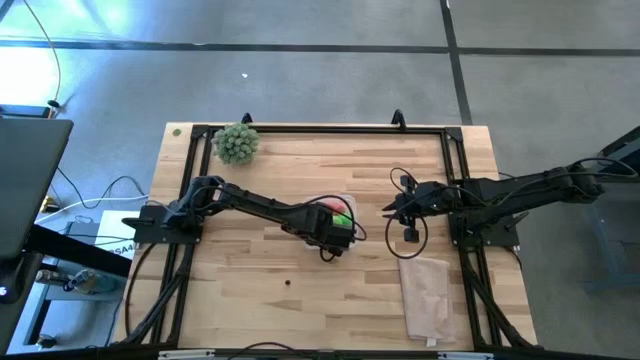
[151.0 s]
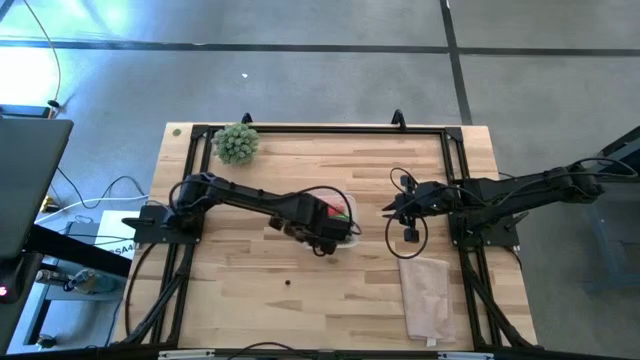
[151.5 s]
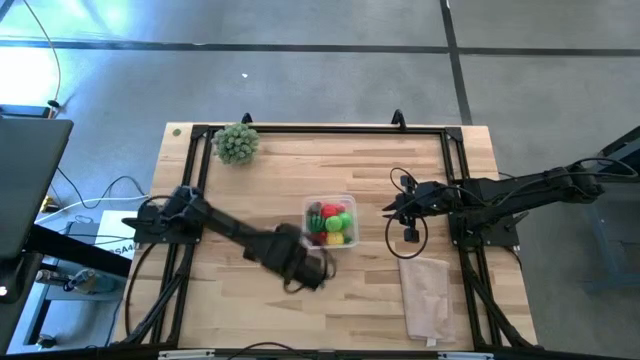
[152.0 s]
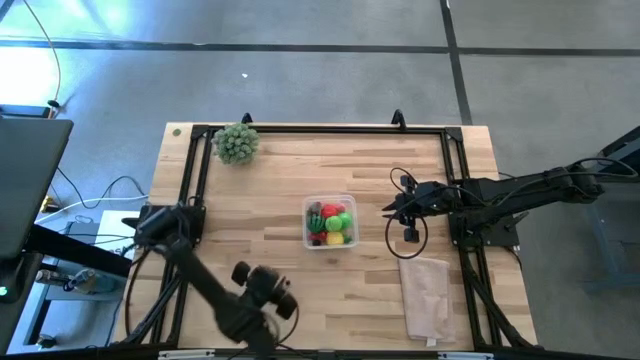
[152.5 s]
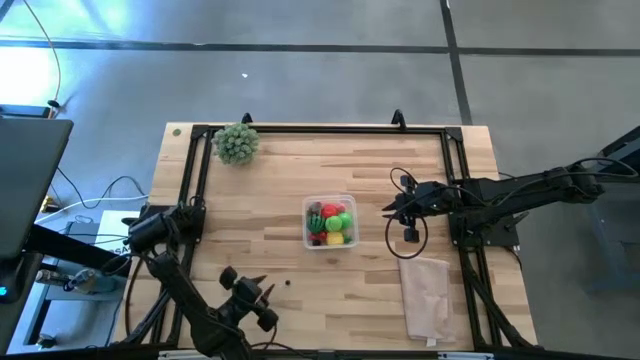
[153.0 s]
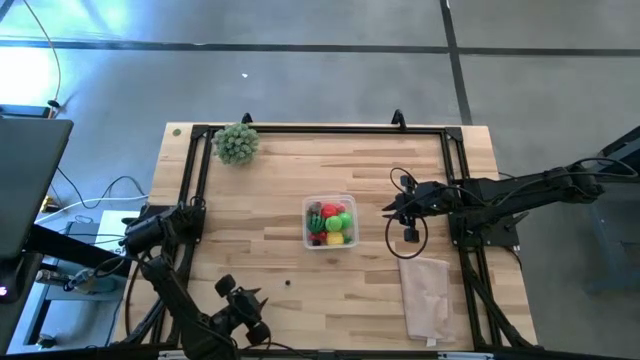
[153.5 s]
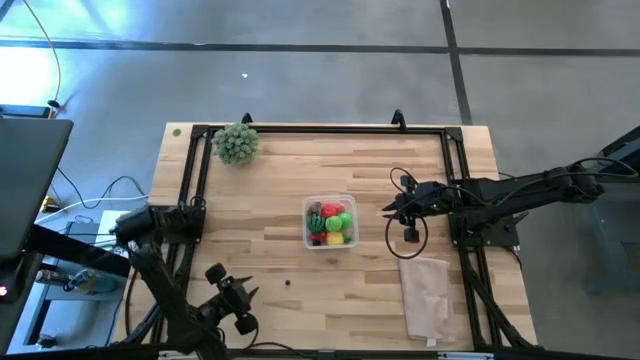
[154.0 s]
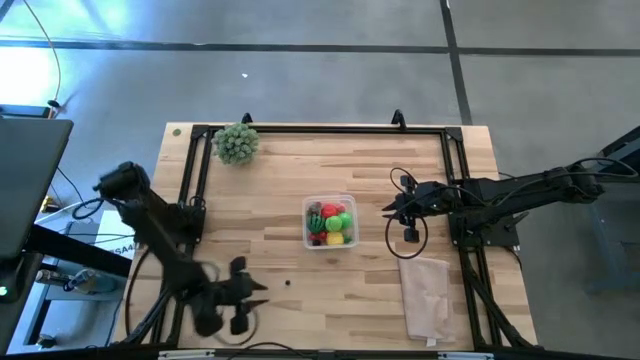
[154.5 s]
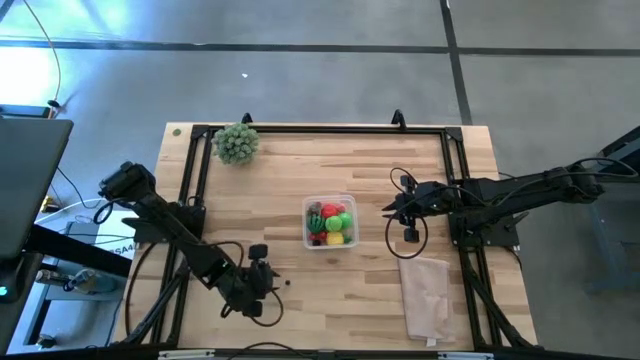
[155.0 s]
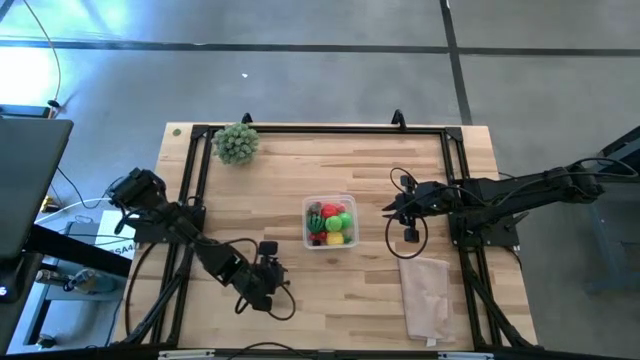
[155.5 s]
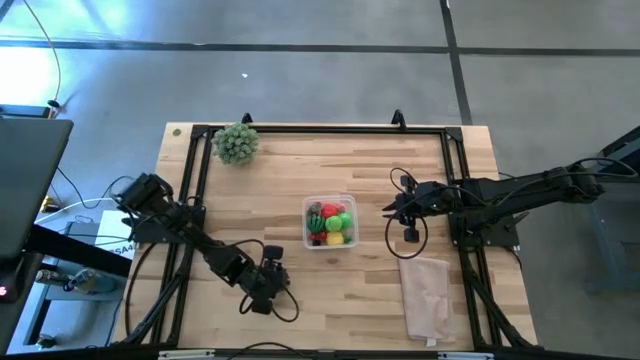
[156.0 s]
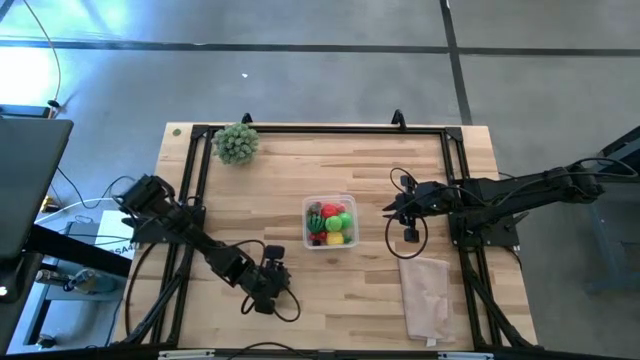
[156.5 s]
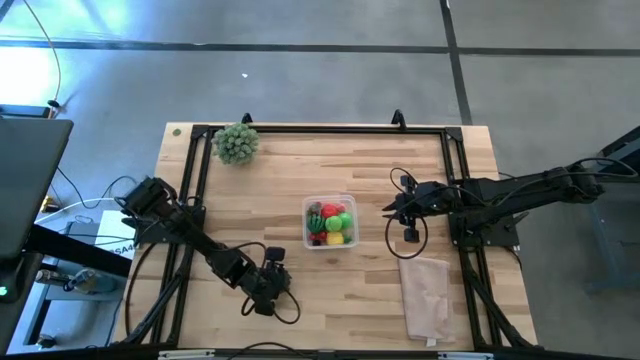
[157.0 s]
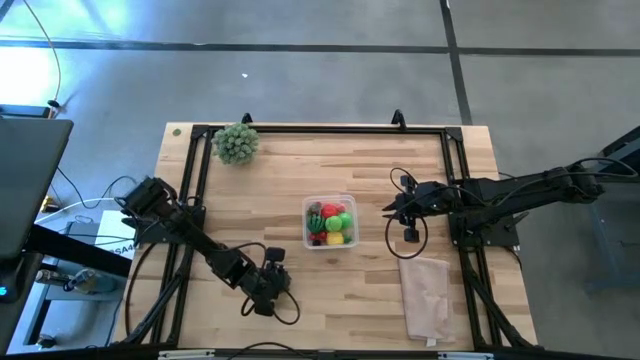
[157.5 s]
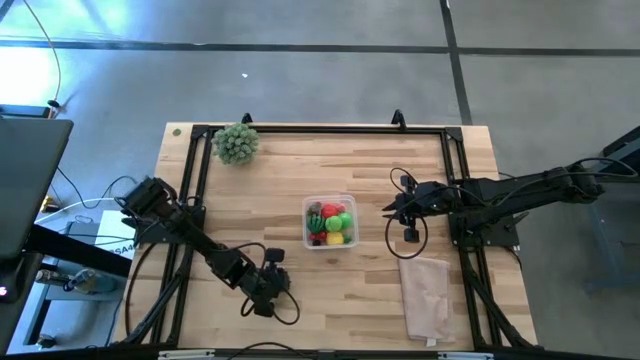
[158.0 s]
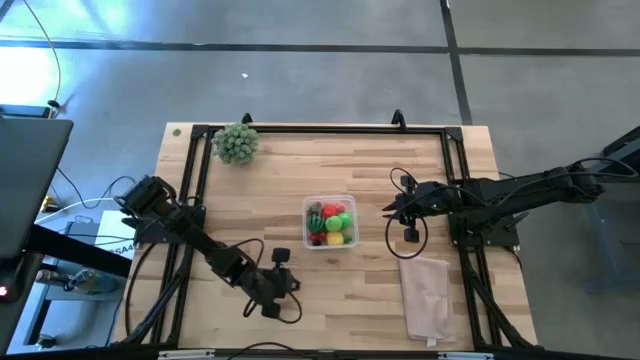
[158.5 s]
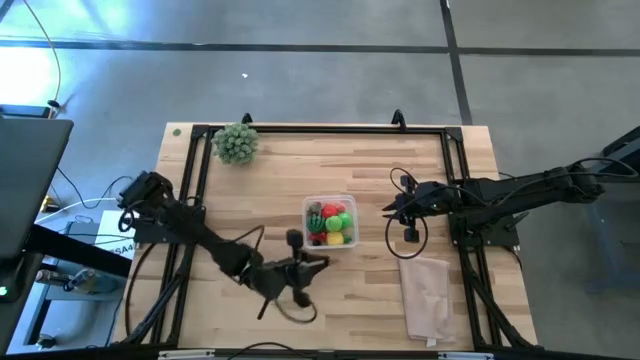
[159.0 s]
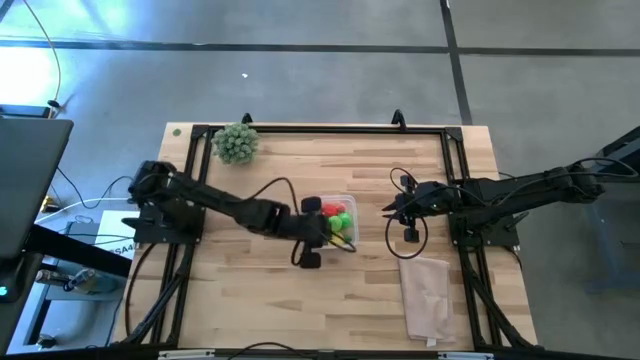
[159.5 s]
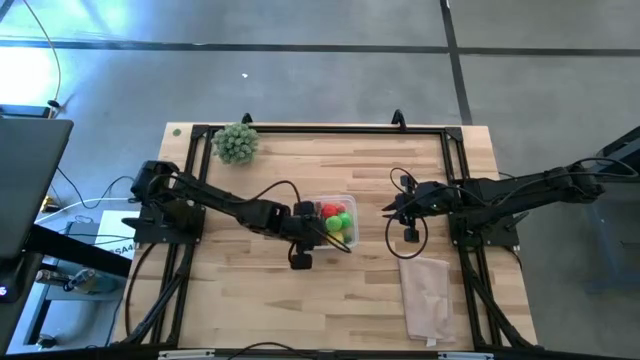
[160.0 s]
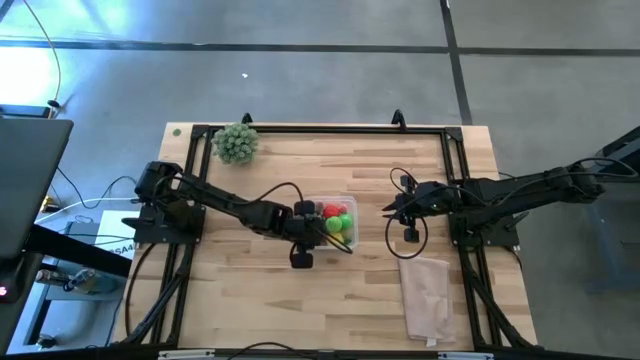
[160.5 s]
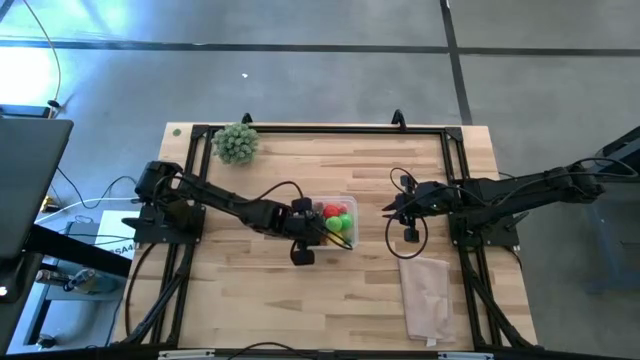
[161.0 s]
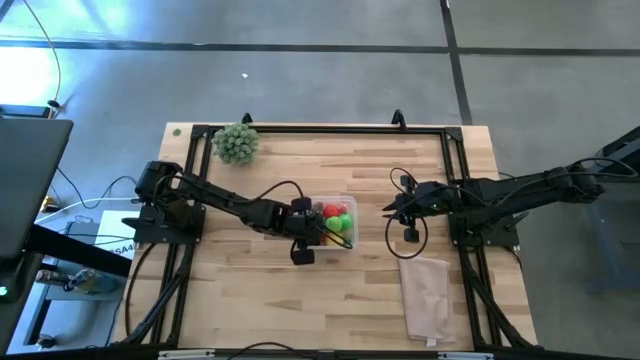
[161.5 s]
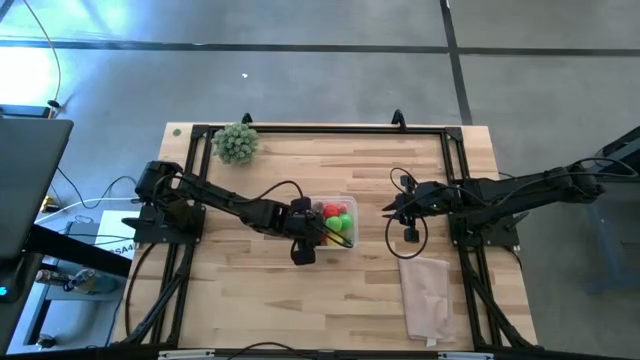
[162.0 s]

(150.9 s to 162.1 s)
Task: Pick and placing Produce into tupperware
Put the black blueberry into the transparent bin

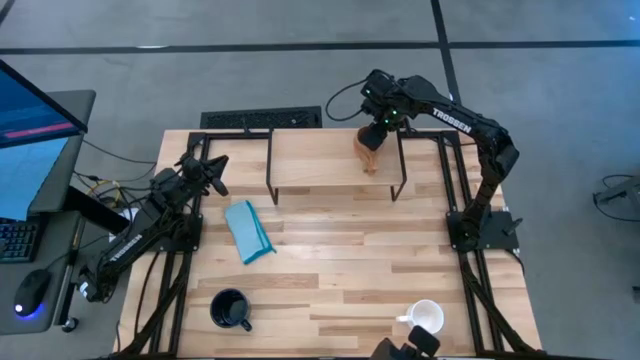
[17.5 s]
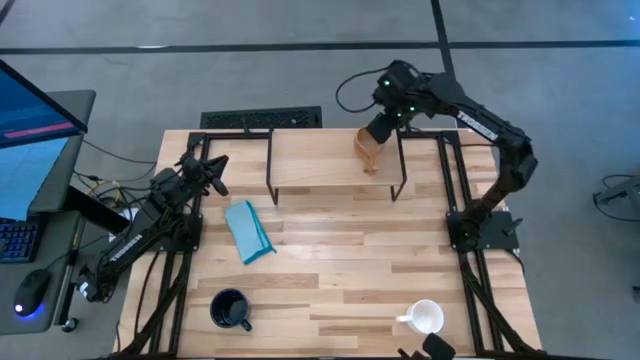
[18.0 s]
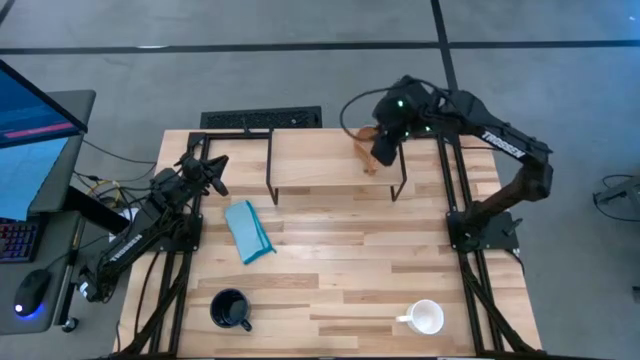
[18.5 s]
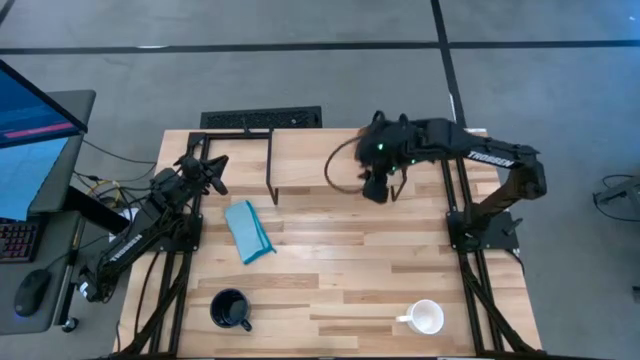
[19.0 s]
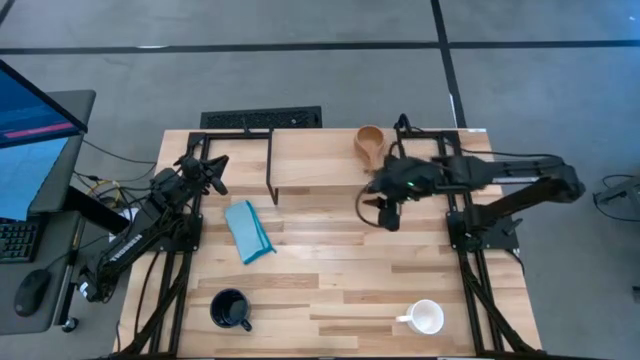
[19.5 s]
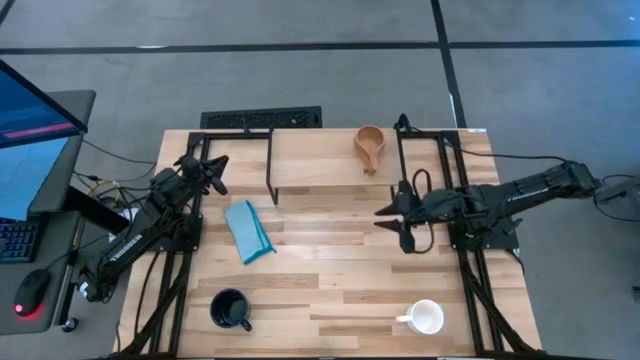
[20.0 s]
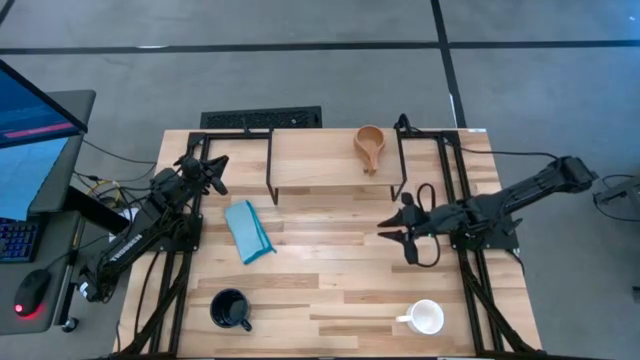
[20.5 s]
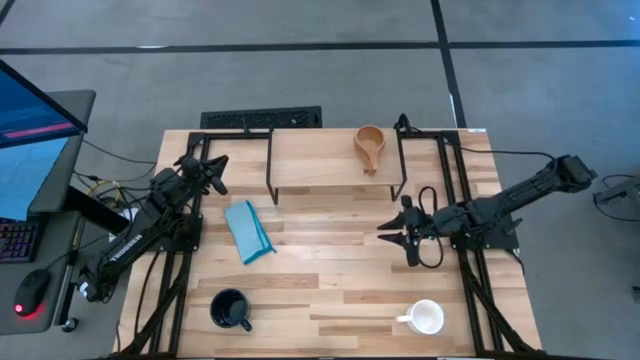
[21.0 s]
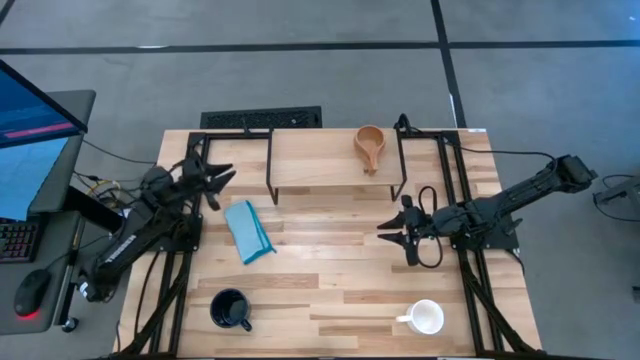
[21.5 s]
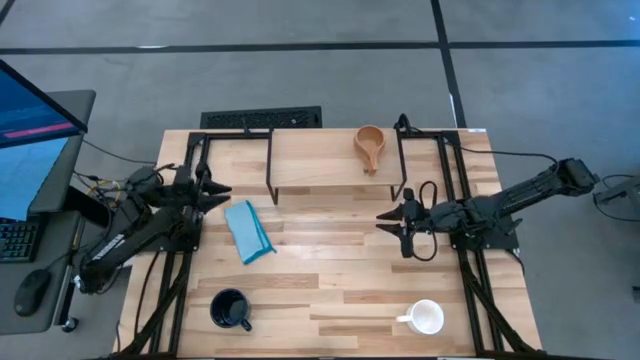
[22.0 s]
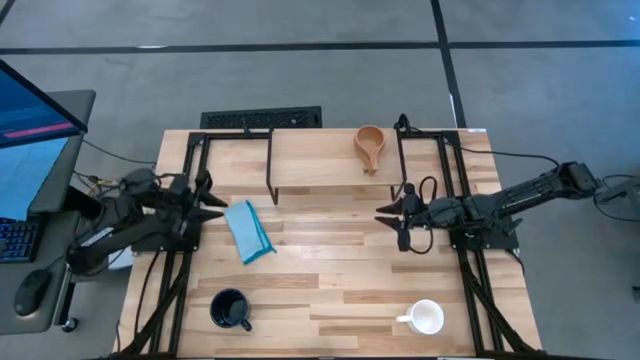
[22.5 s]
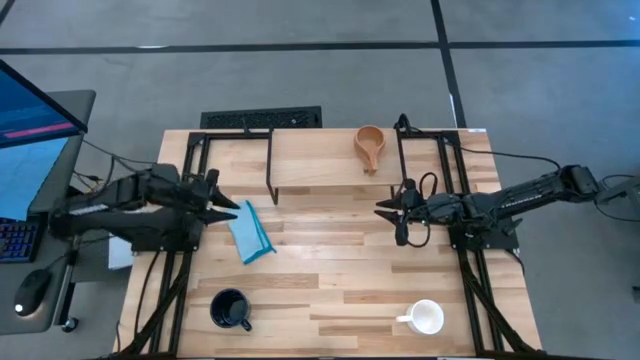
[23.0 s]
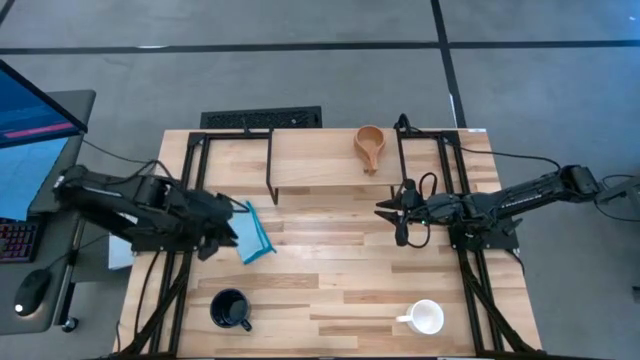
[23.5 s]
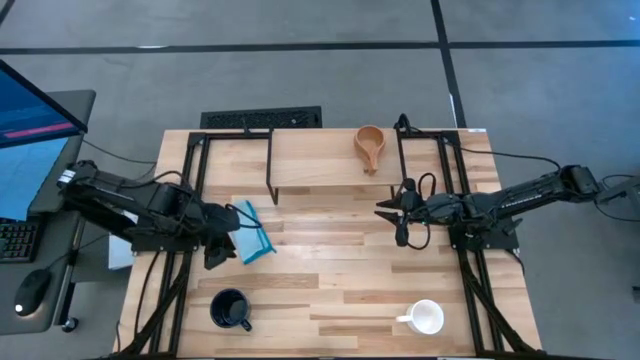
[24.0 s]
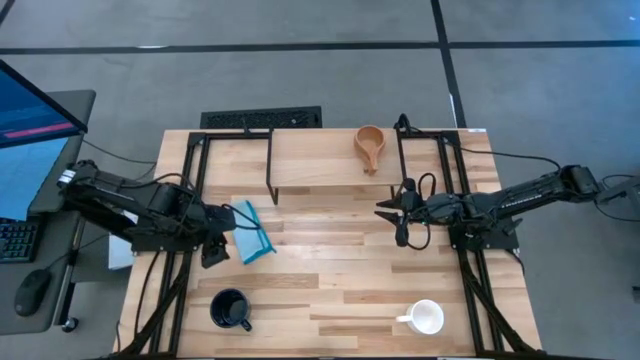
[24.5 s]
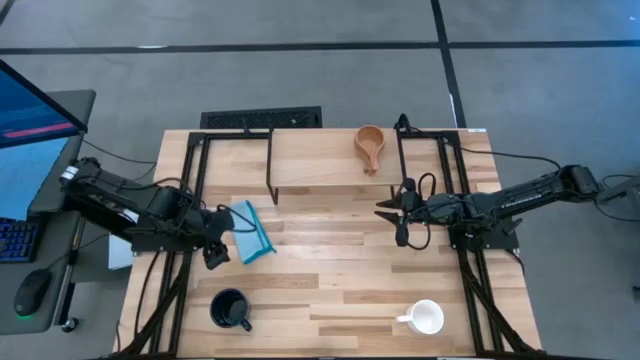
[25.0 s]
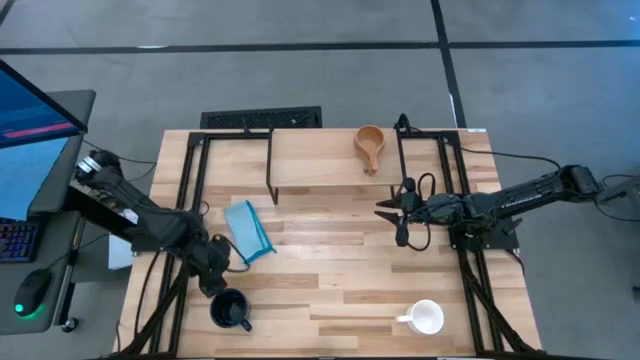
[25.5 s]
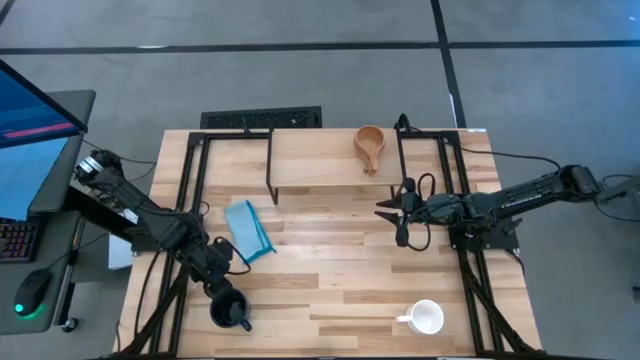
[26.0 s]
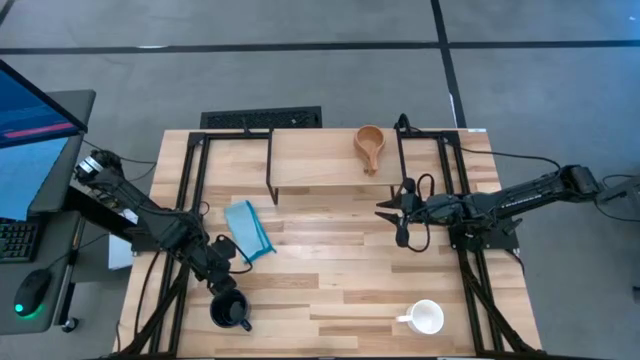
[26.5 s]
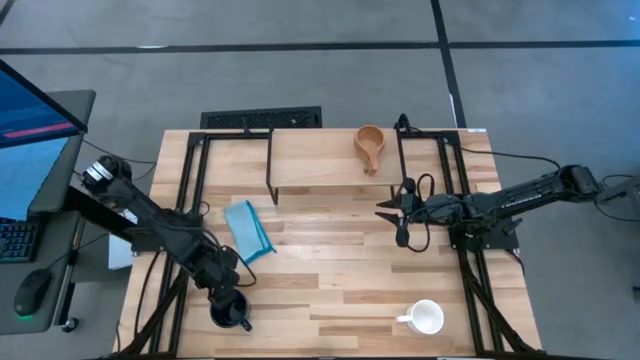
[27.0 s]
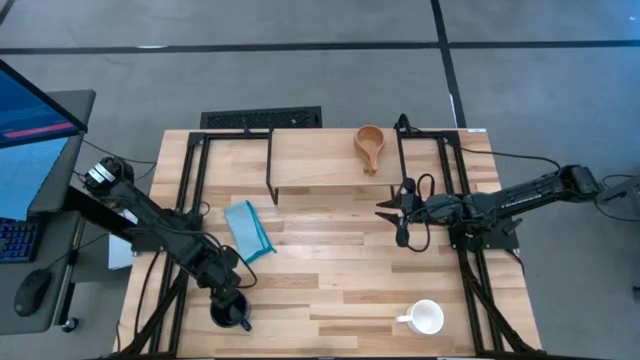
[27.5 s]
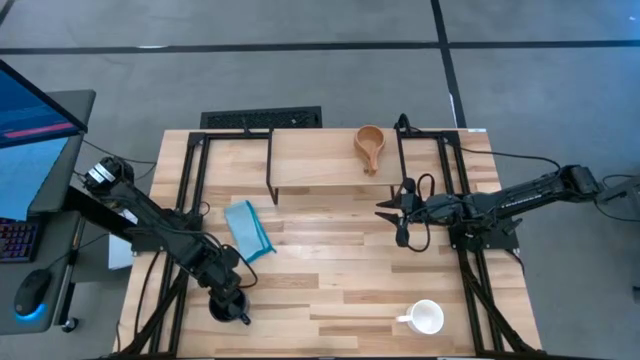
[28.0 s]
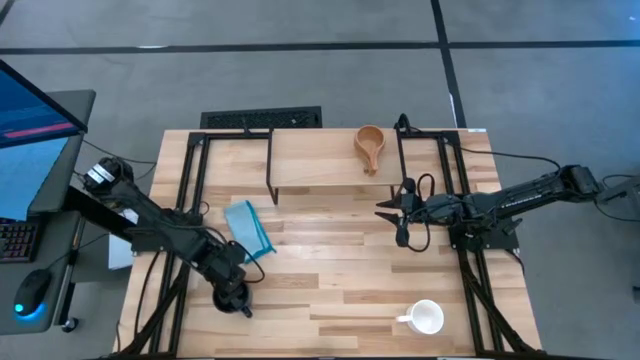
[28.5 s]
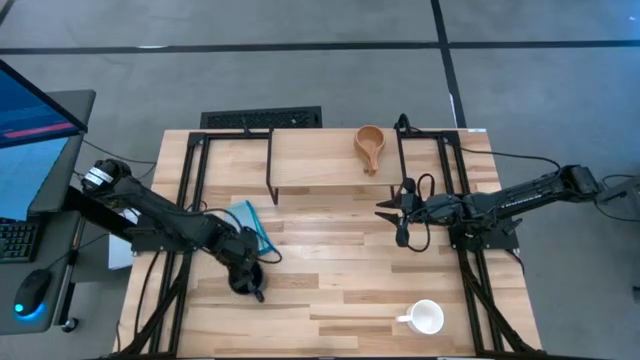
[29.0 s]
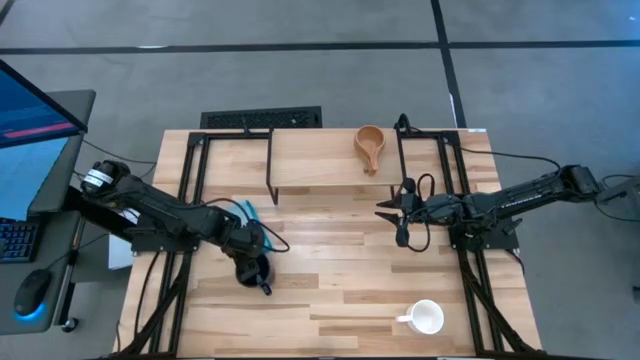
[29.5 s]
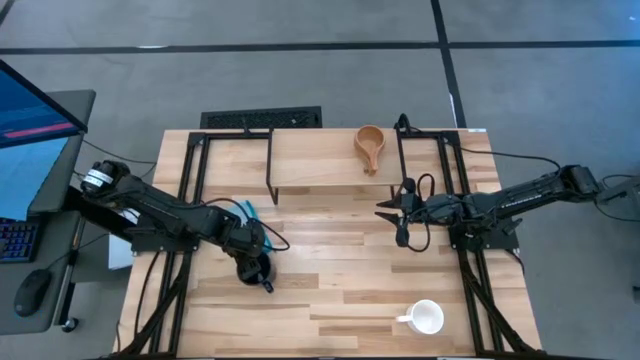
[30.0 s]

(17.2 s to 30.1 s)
Task: Stack small to large cups/mugs on shelf
Put the black mug on the shelf
